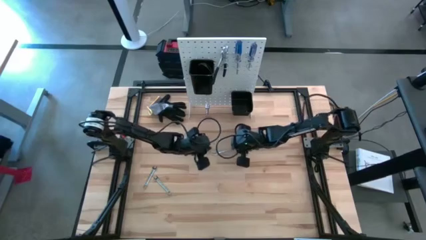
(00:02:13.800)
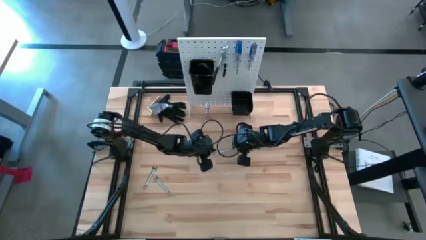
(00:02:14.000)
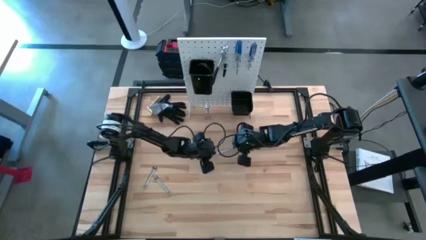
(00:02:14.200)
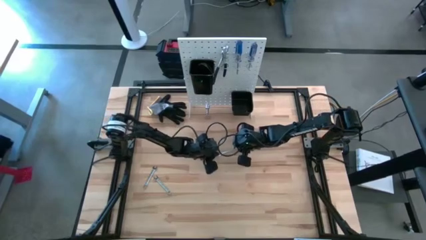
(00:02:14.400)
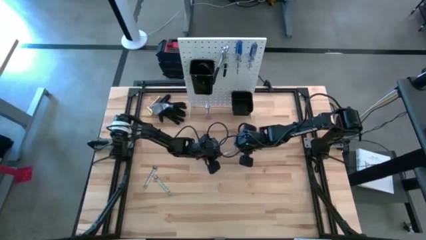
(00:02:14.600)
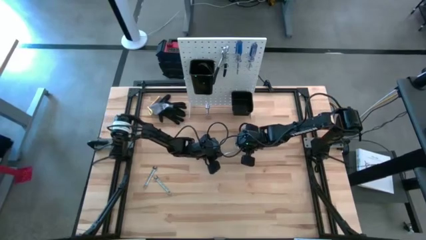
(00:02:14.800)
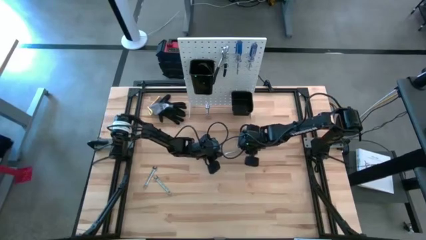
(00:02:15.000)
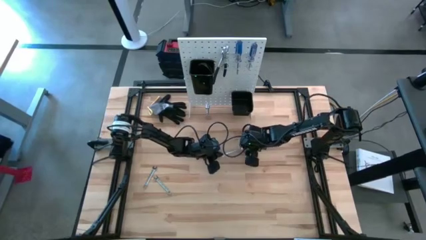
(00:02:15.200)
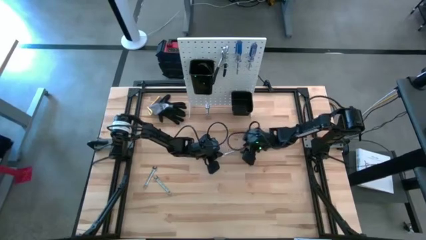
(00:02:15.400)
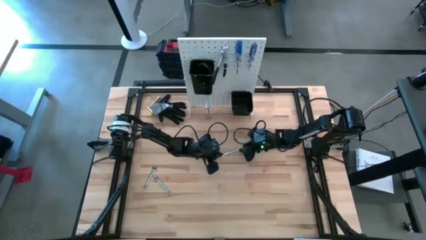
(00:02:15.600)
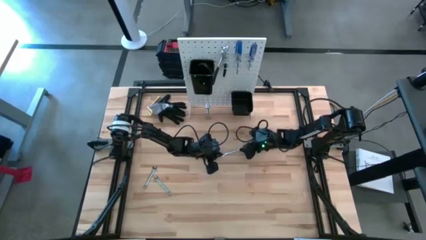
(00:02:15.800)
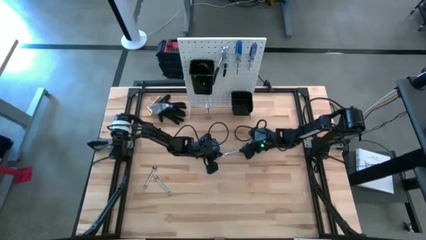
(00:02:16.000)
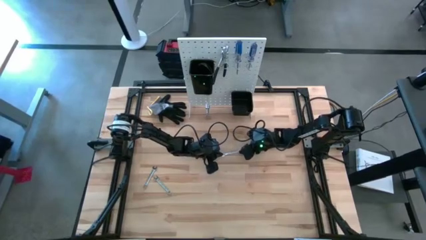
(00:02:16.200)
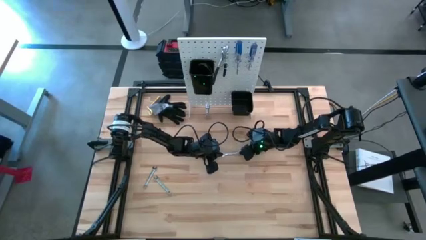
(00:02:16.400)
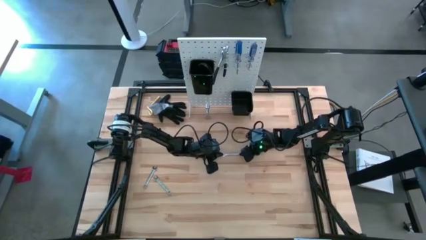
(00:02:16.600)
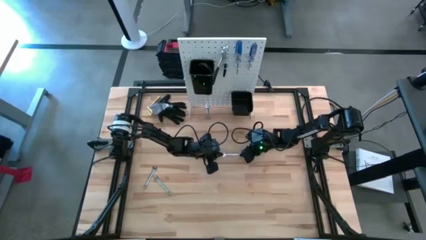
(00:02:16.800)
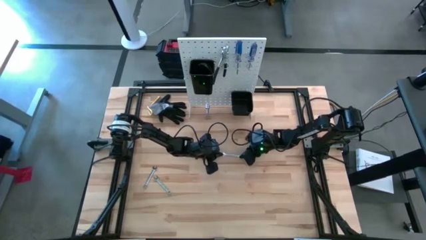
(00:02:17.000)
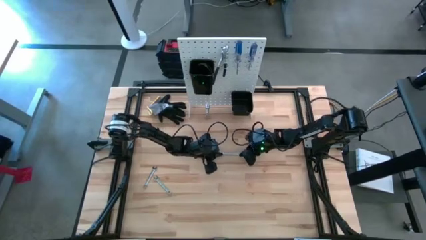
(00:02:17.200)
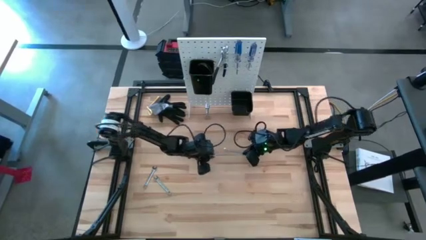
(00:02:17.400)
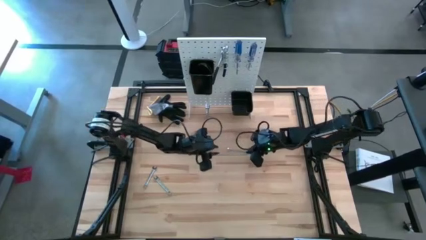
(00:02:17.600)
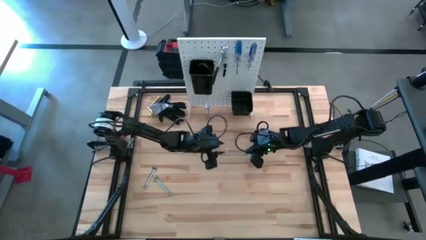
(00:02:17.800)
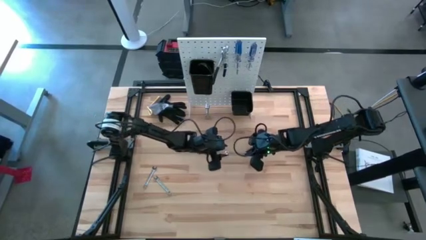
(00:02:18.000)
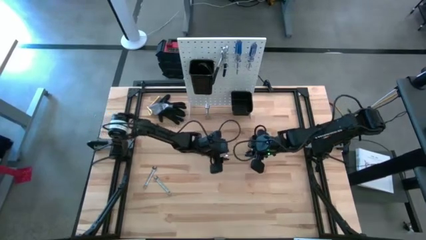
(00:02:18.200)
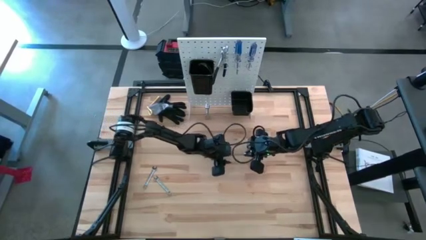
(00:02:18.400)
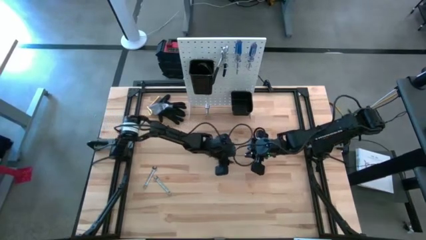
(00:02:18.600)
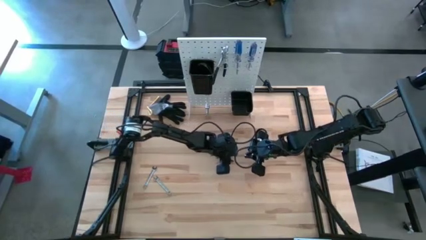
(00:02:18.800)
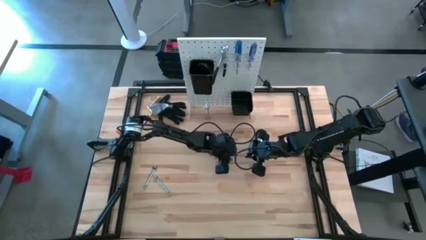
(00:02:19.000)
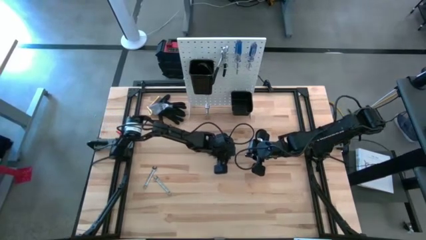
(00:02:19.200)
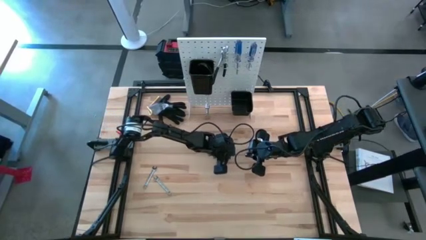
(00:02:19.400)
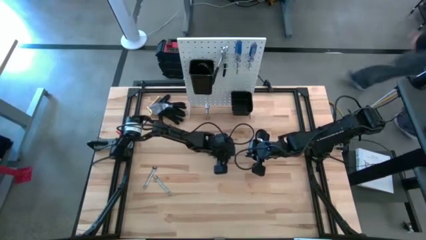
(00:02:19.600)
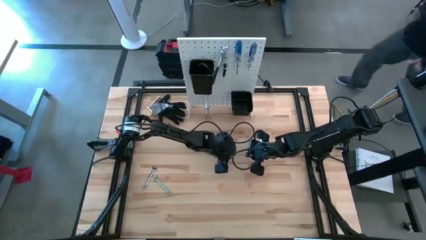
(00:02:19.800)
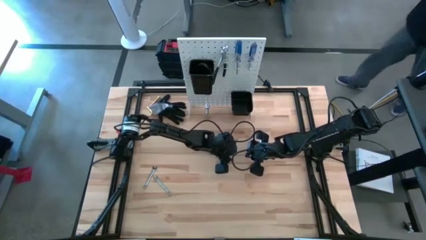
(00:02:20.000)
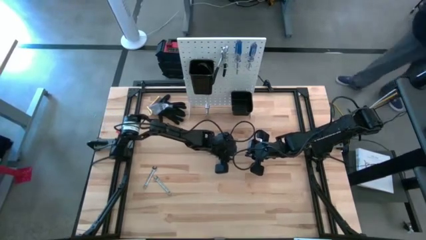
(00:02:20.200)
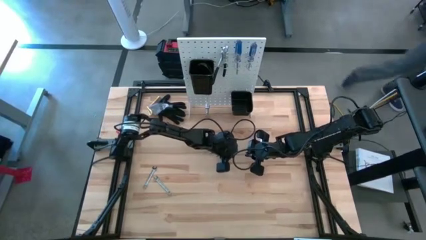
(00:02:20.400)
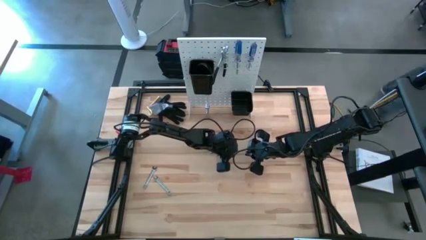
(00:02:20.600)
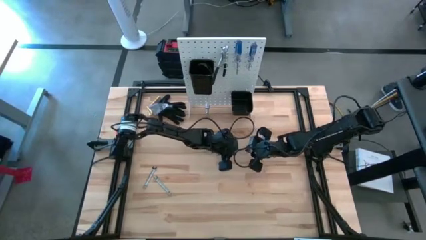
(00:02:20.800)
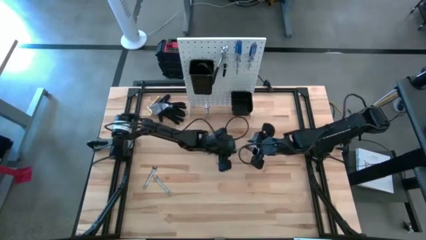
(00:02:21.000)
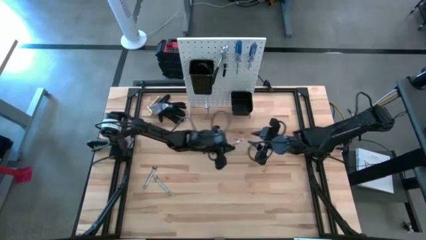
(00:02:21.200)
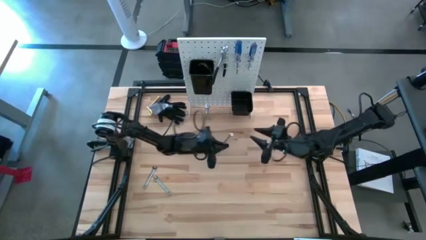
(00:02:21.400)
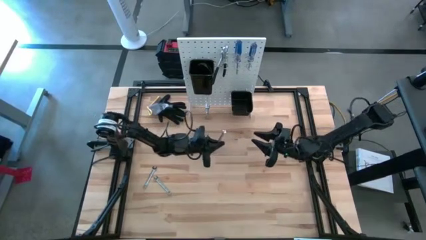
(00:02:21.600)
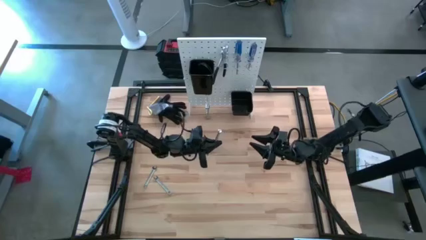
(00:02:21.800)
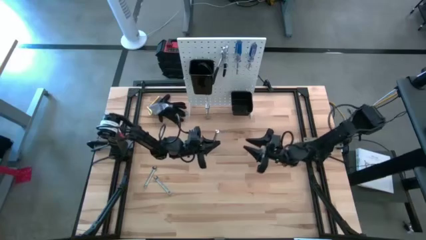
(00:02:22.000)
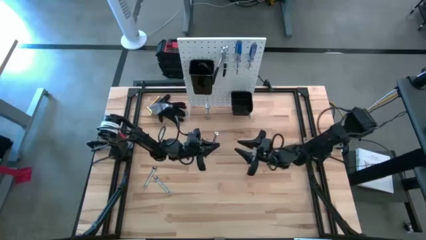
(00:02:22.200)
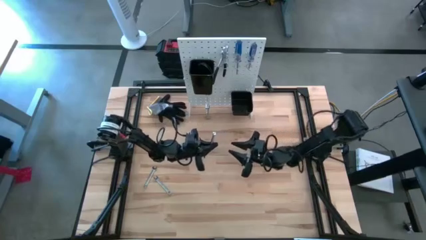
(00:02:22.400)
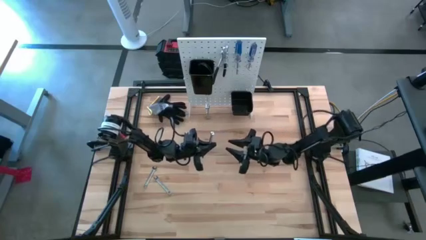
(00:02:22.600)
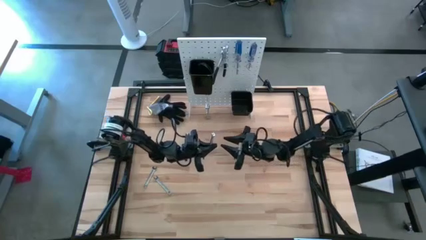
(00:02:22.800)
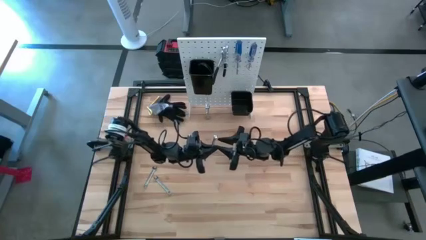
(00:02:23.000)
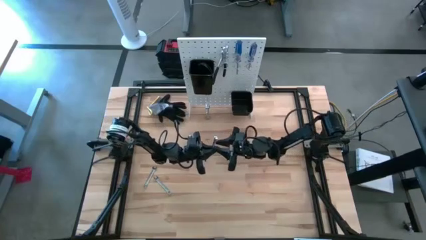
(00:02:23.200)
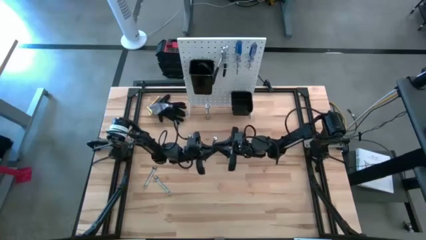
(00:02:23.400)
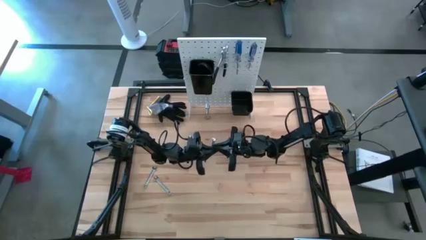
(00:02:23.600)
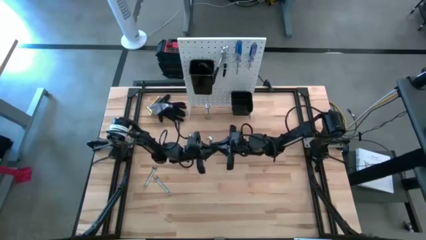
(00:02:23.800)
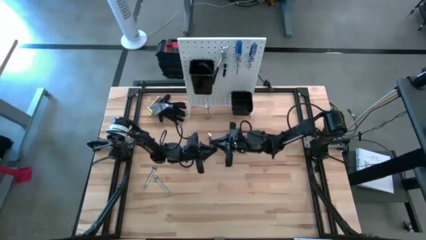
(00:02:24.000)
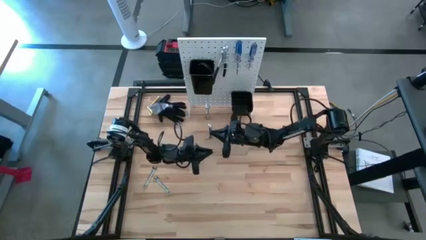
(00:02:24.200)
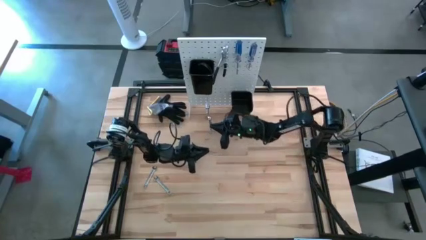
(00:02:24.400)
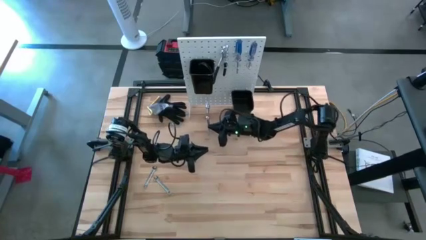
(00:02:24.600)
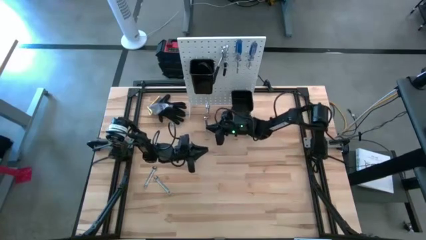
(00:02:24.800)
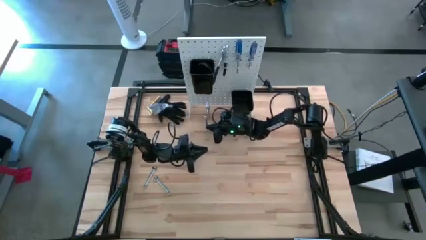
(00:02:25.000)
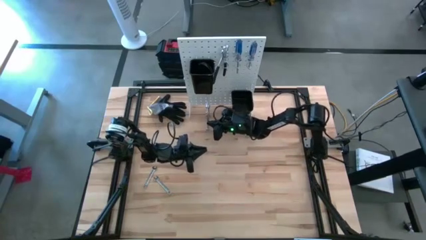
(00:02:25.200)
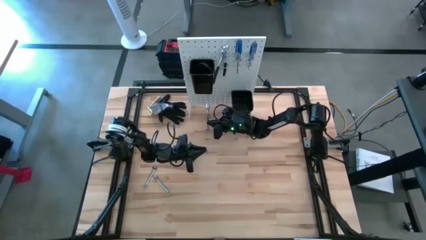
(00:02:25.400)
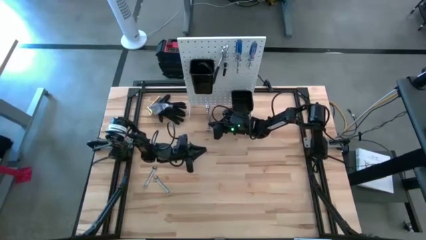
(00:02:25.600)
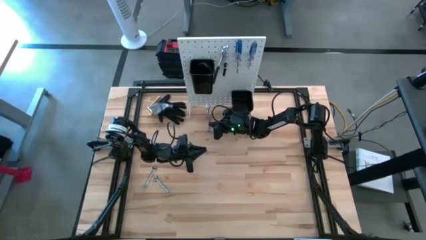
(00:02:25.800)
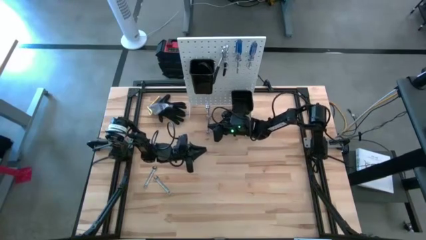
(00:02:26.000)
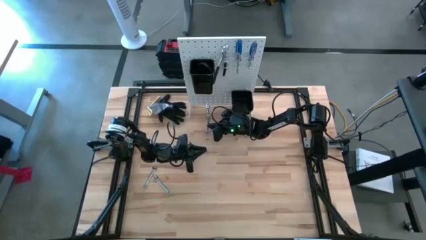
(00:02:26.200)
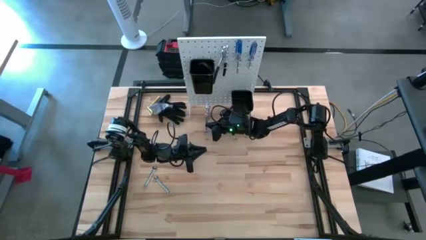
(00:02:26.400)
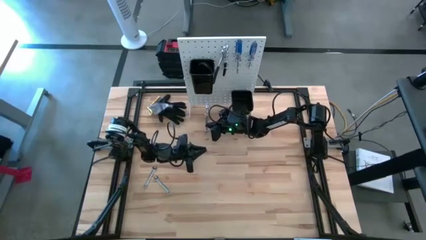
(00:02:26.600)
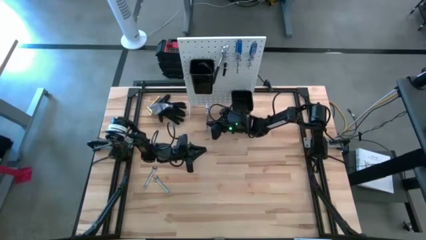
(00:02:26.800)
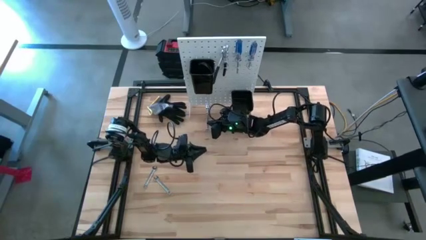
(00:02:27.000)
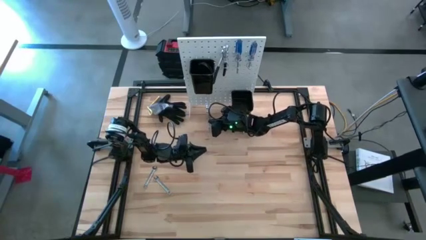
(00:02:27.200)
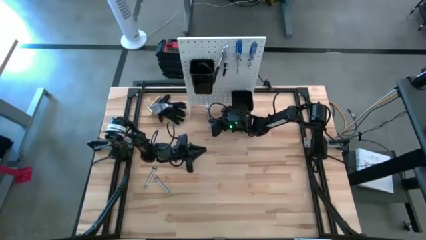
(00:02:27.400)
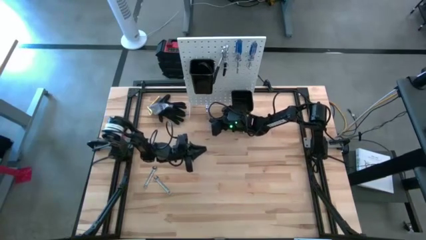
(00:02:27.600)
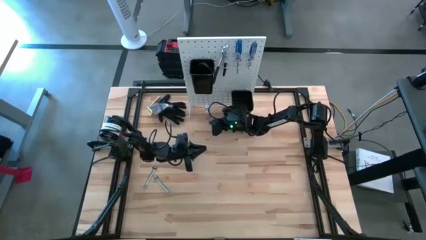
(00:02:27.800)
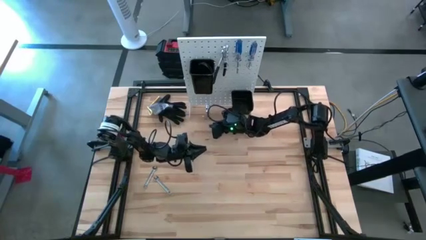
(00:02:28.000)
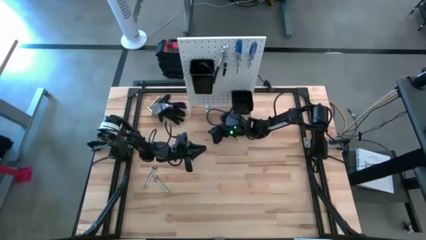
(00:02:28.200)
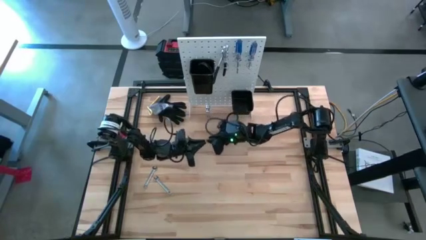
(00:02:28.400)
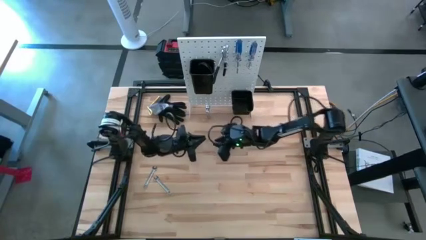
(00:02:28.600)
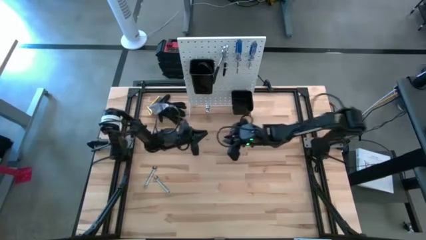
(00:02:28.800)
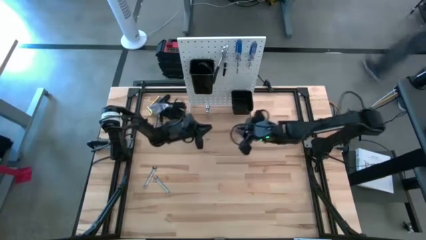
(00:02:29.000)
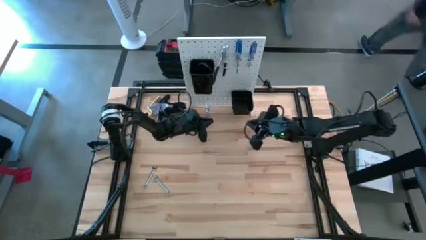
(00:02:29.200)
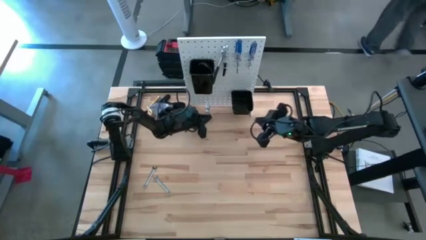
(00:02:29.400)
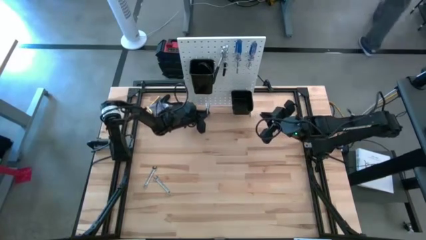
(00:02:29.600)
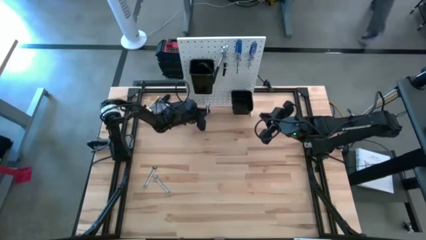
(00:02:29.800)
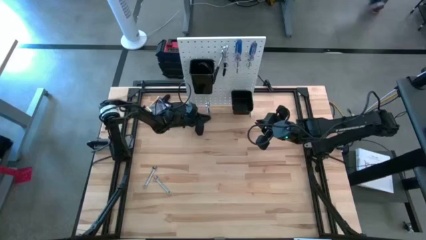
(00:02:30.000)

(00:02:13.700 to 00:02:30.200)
Task: Hang tools onto peg board
Hang the wrench on the peg board
